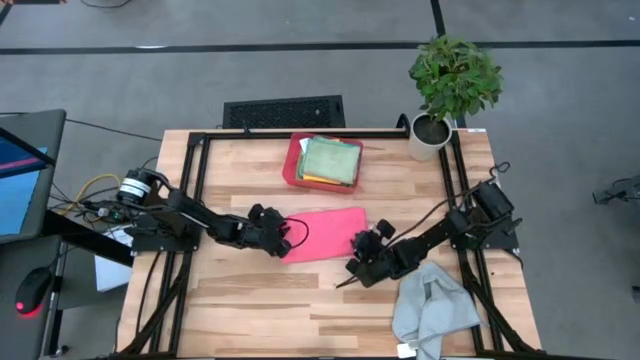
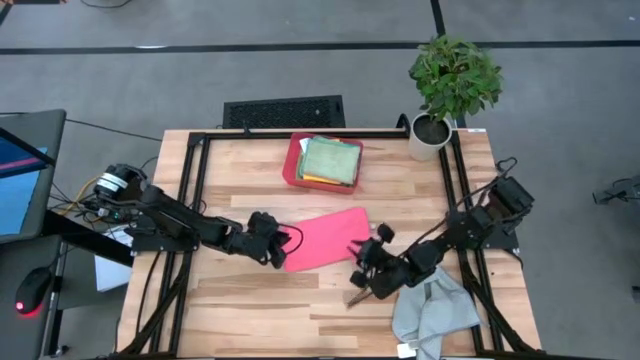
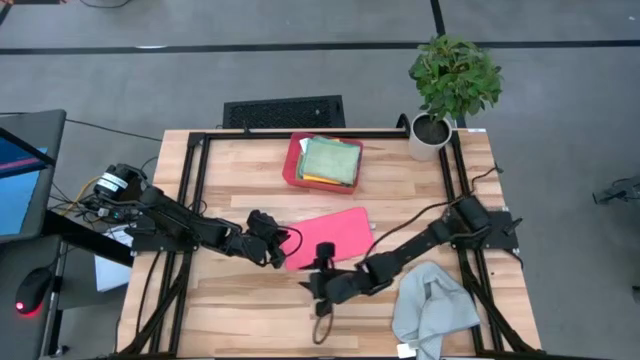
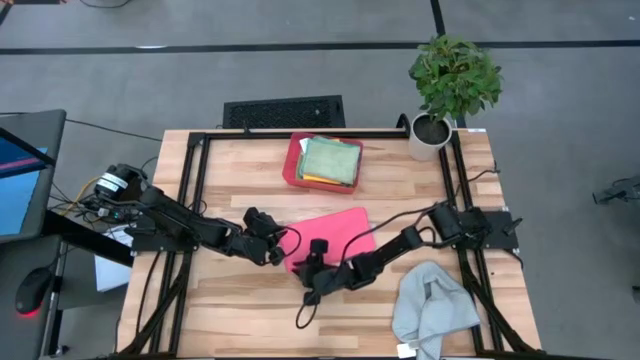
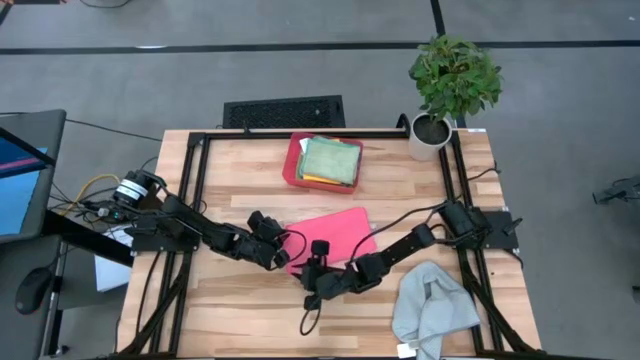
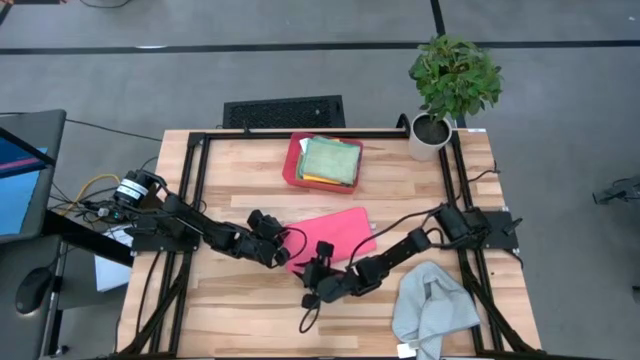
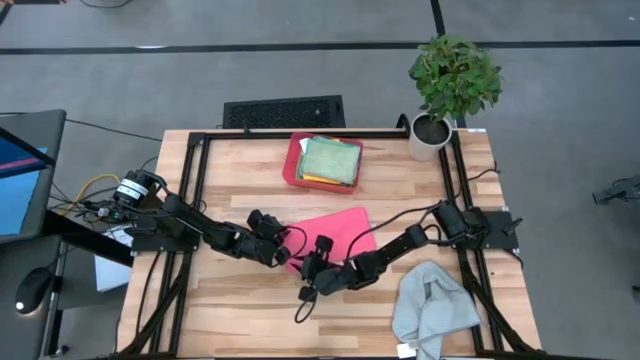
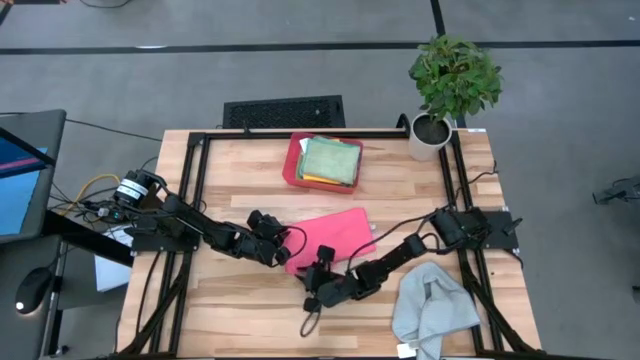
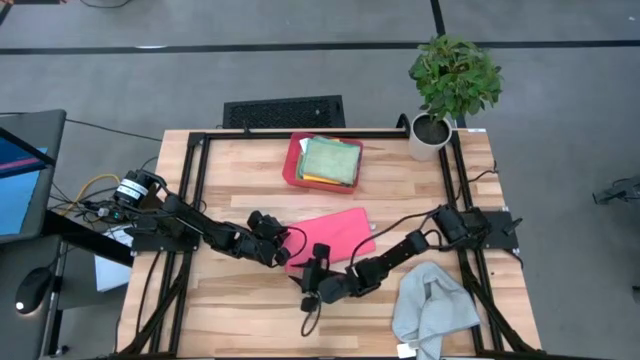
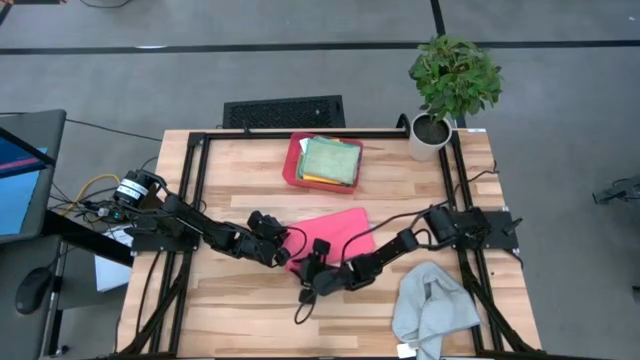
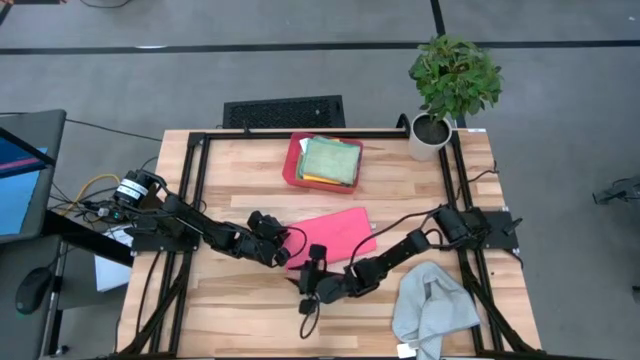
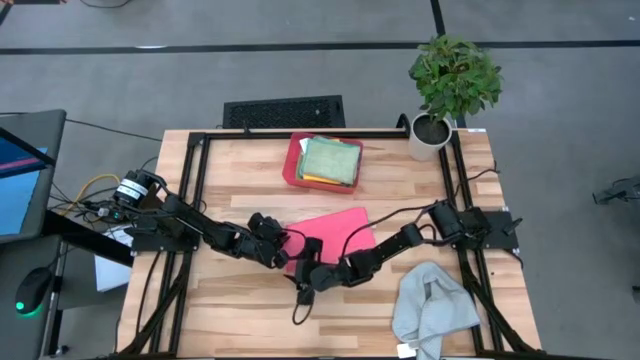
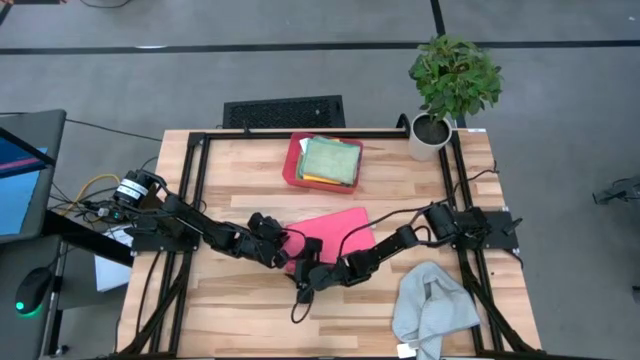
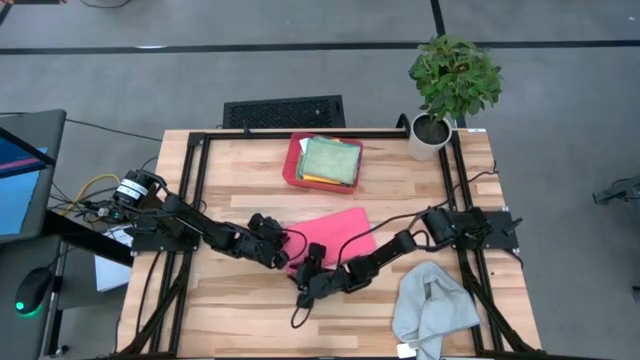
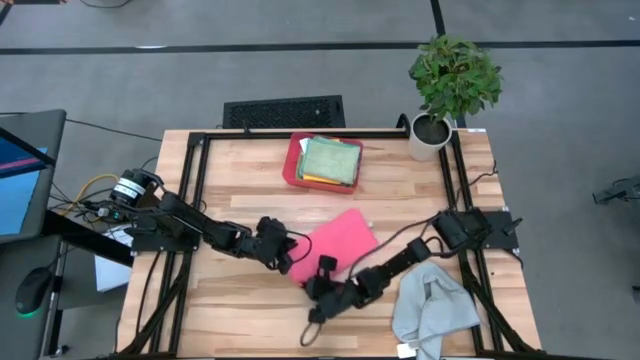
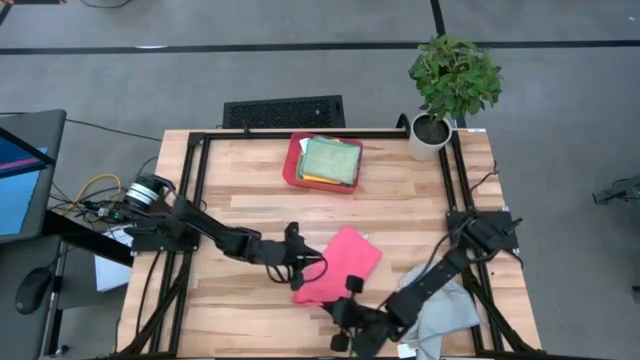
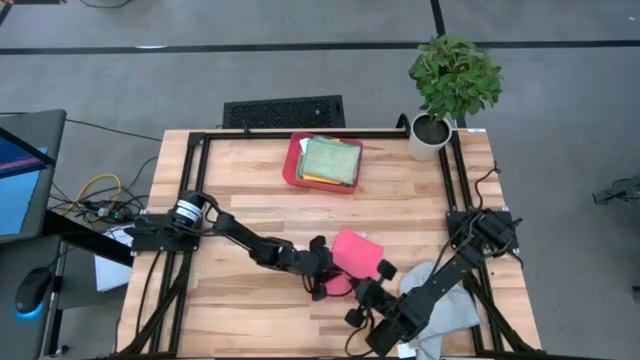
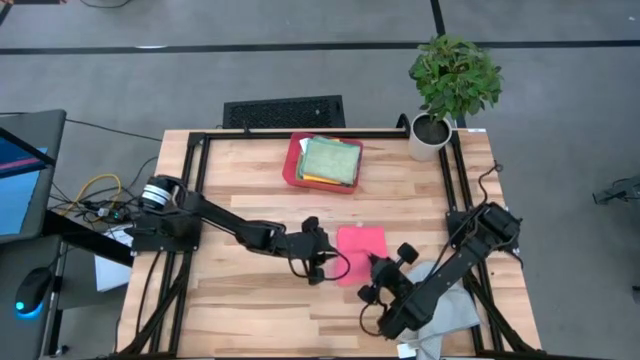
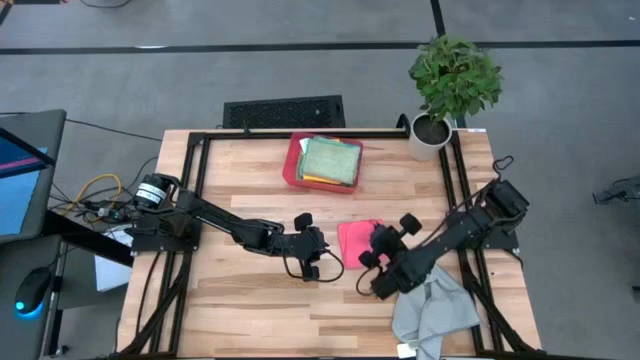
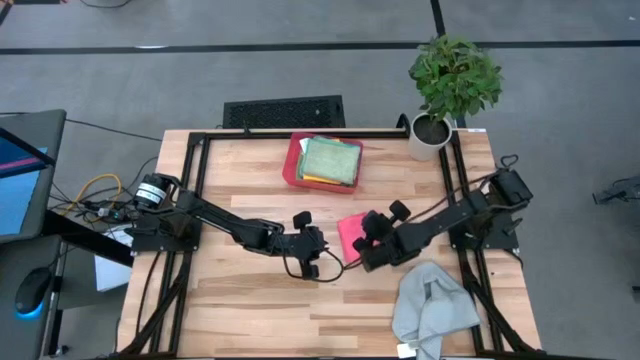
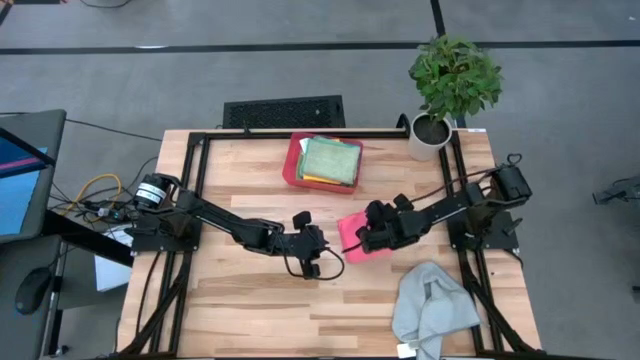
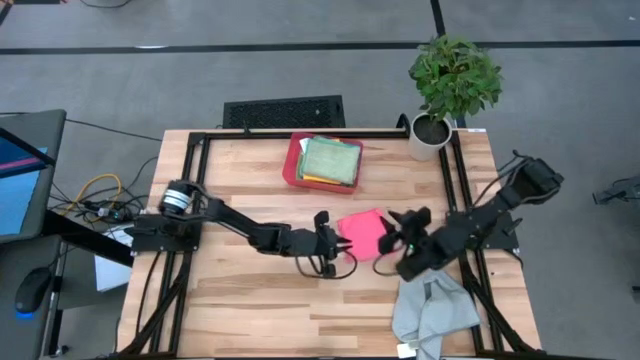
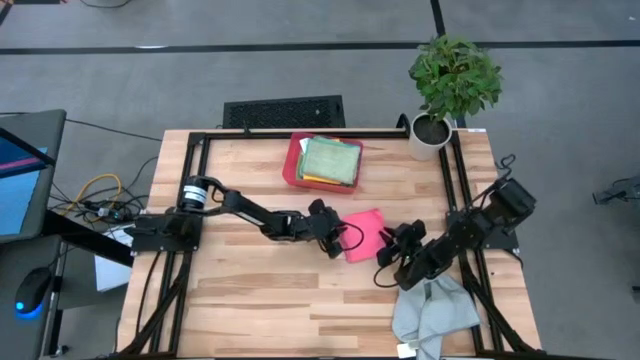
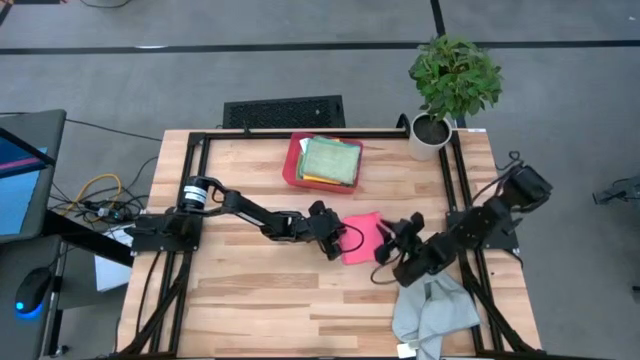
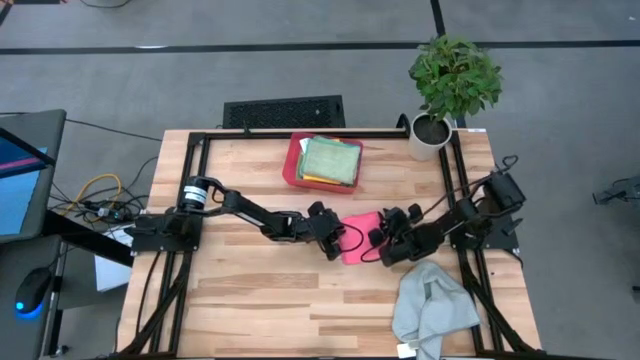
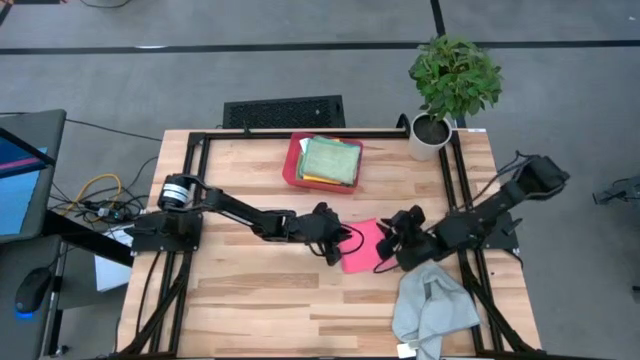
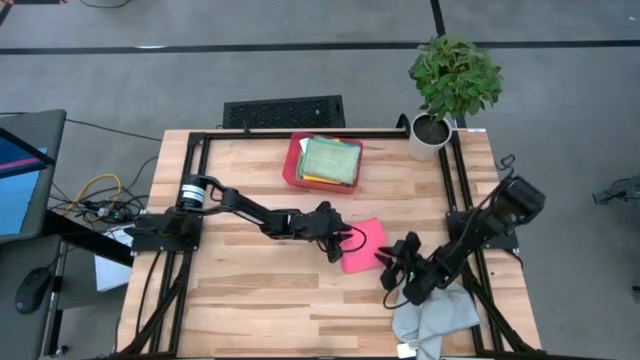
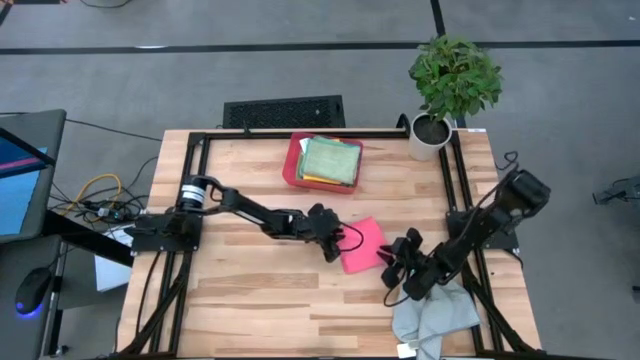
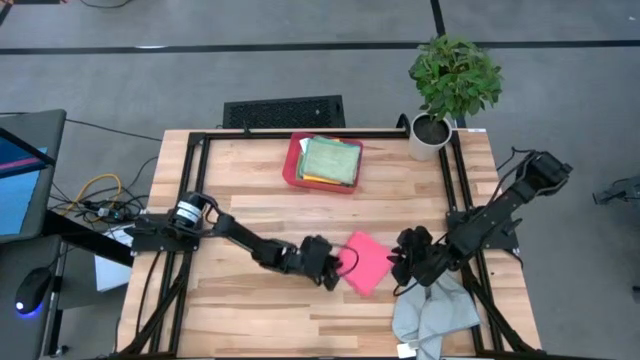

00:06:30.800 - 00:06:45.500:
Task: Fold microfiber towels
Fold the pink microfiber cloth

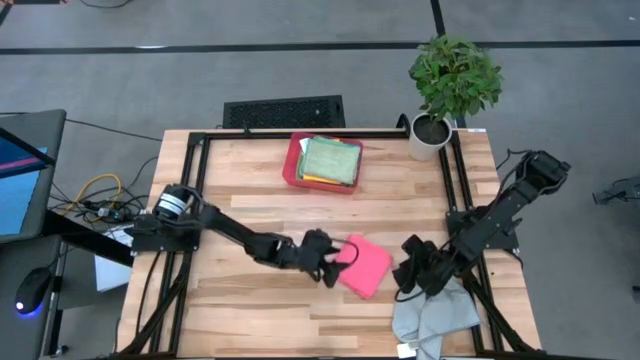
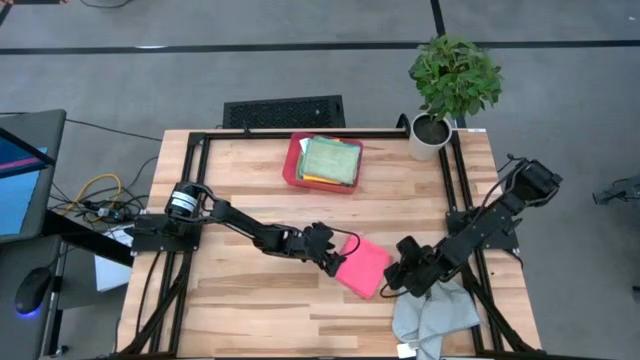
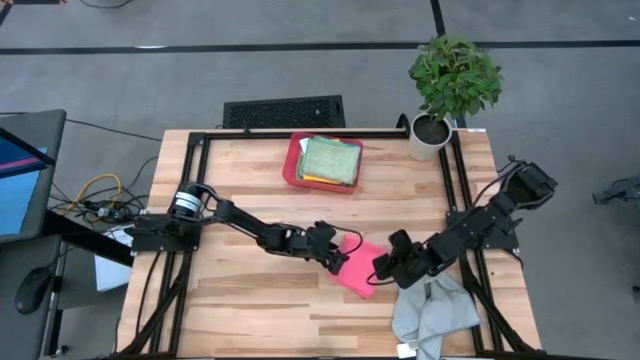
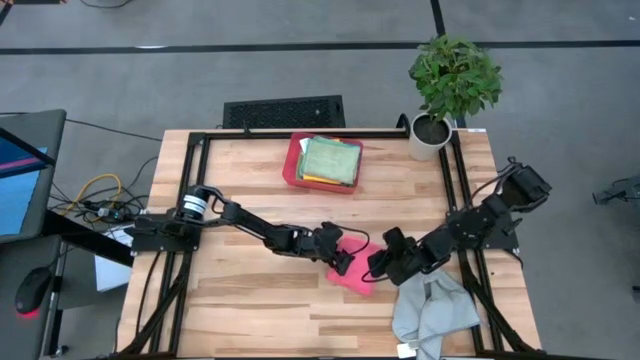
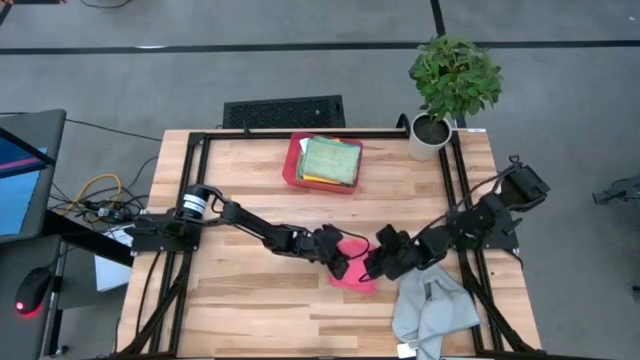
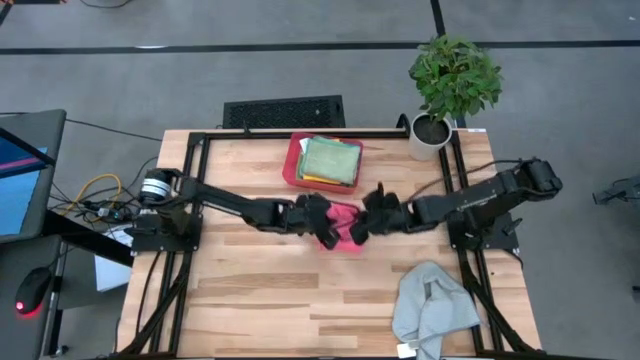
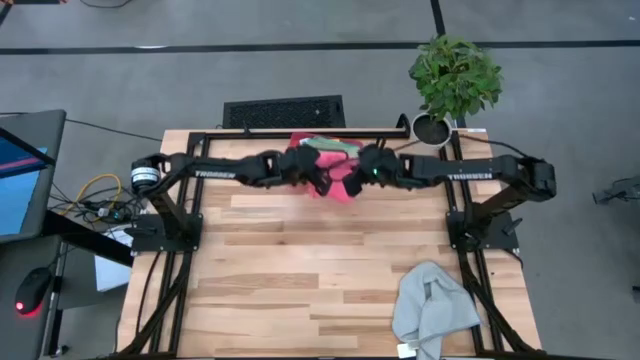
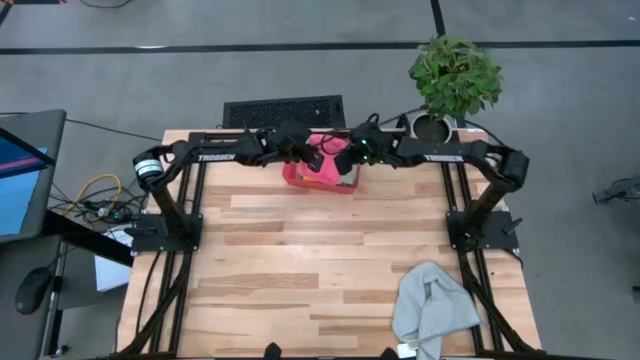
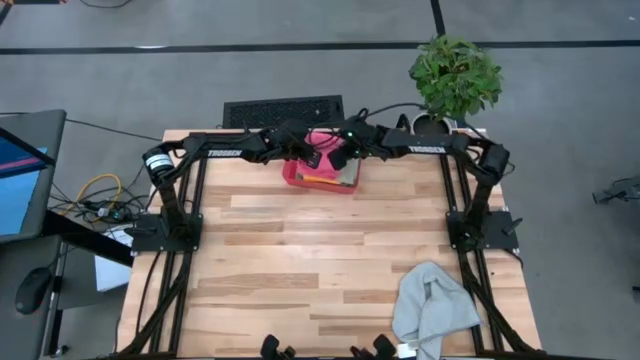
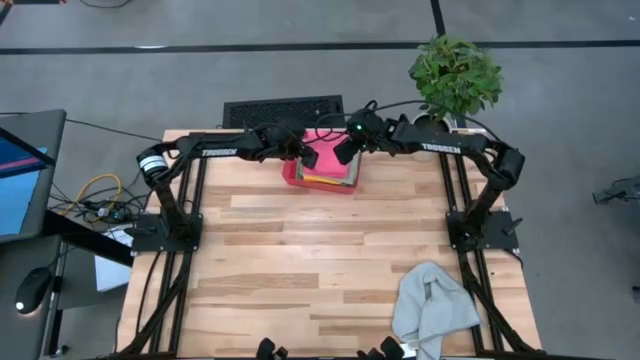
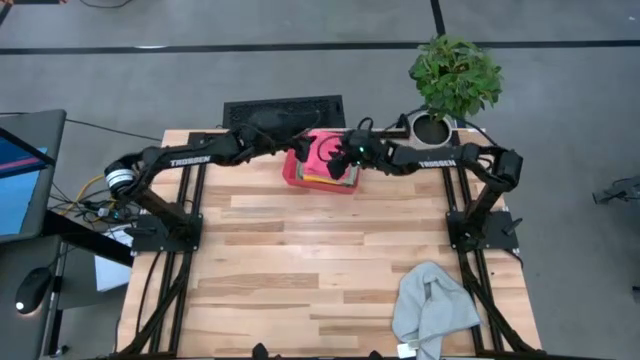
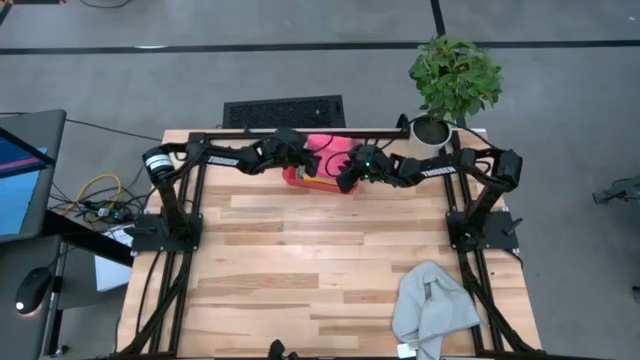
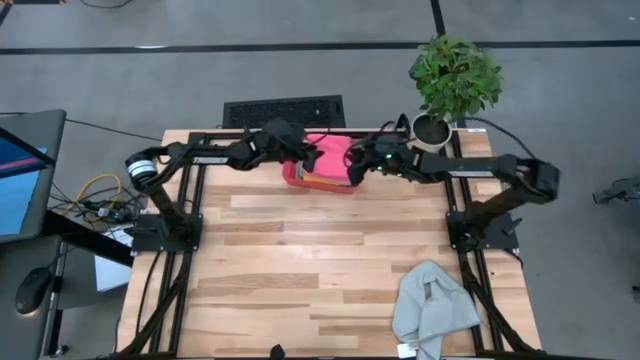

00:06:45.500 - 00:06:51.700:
Stack the pink microfiber cloth on top of the green microfiber cloth in the red bin
